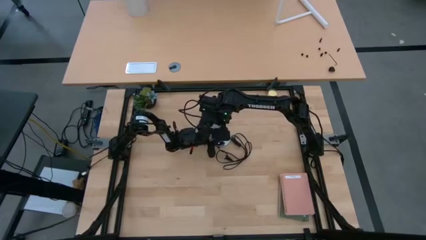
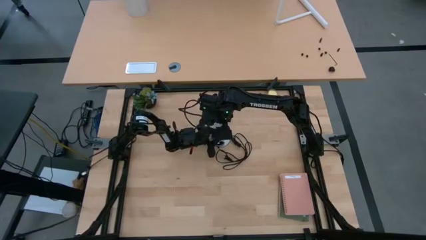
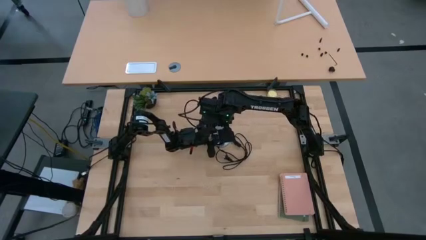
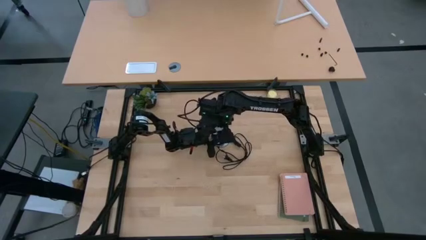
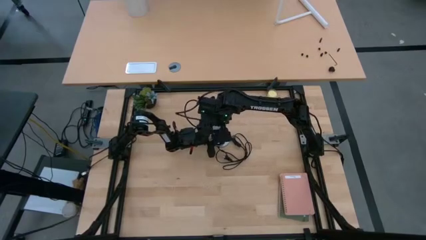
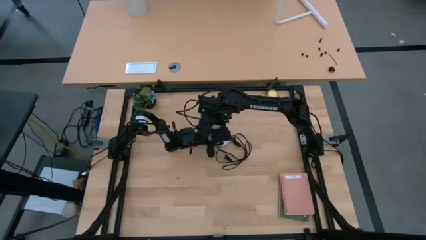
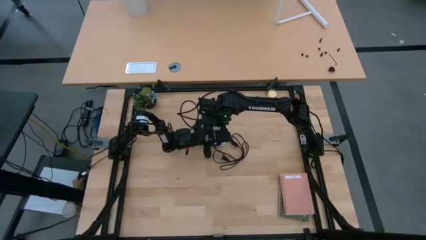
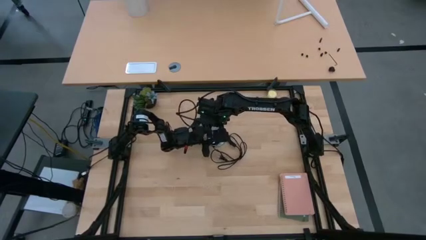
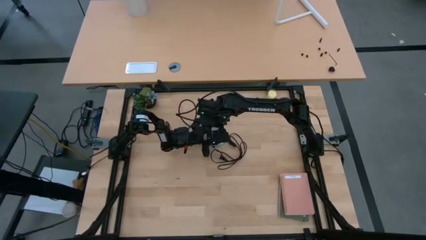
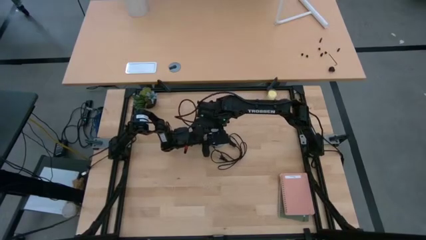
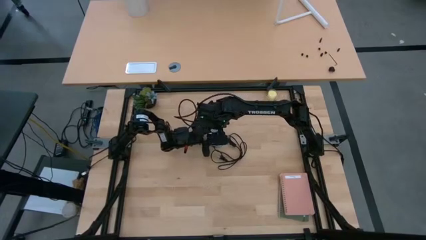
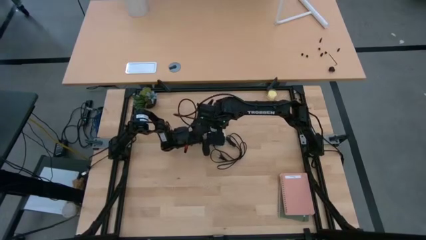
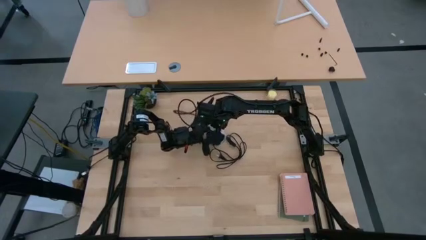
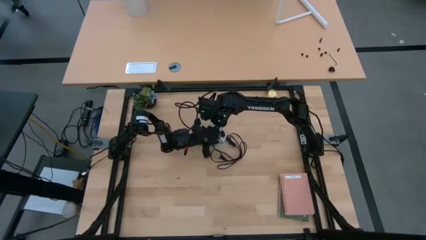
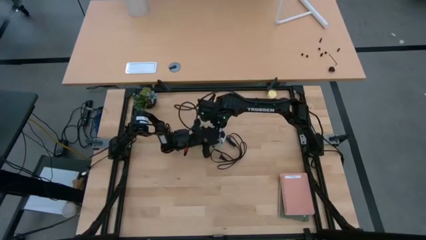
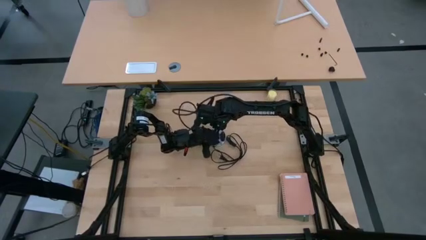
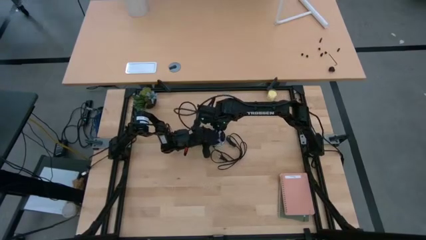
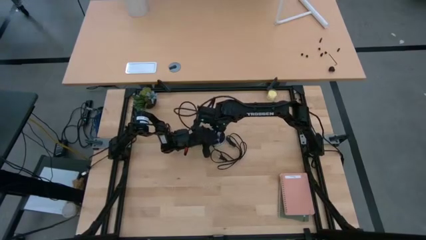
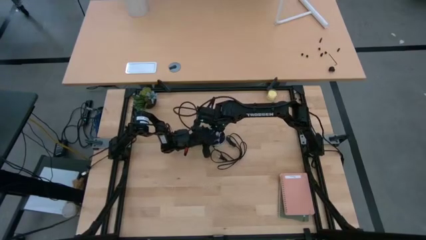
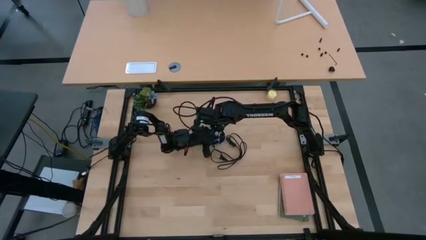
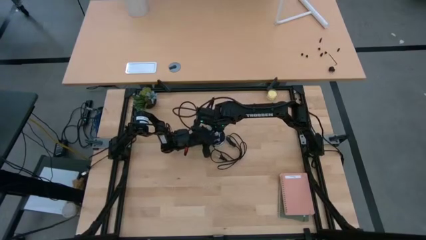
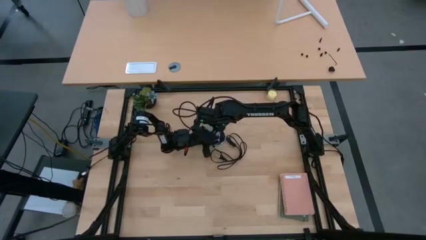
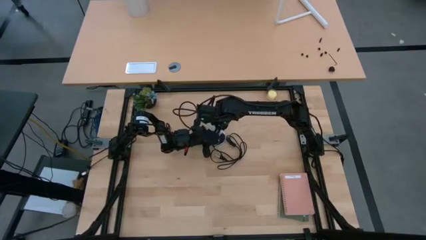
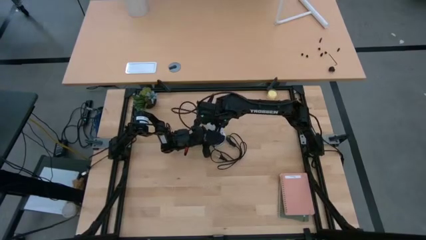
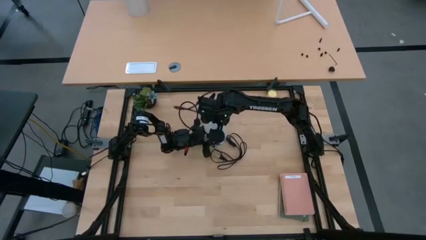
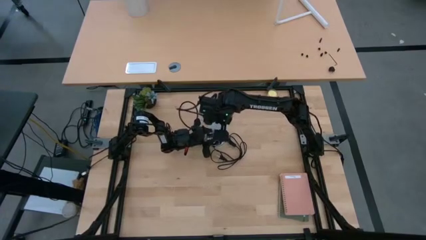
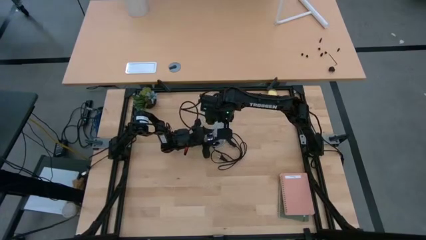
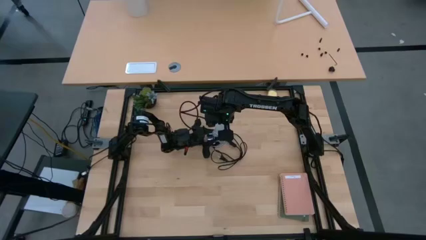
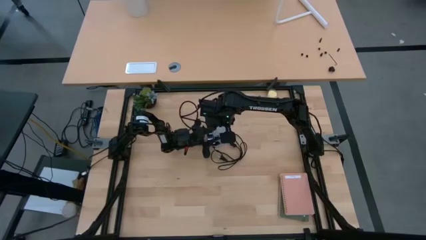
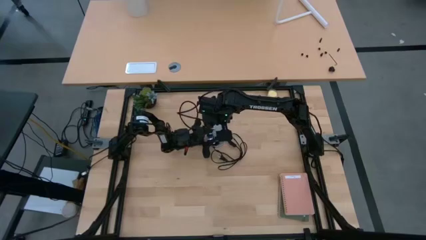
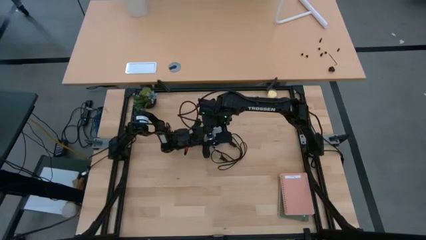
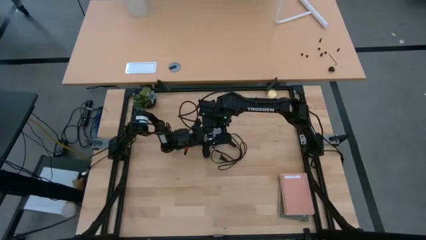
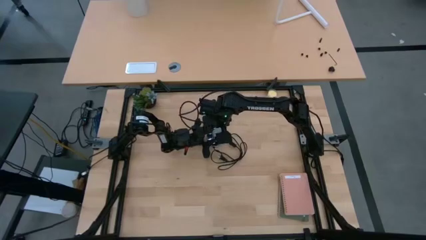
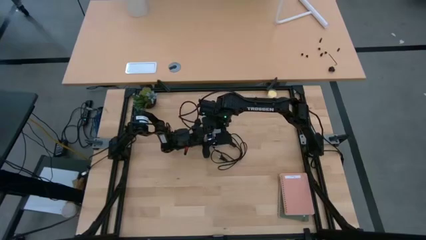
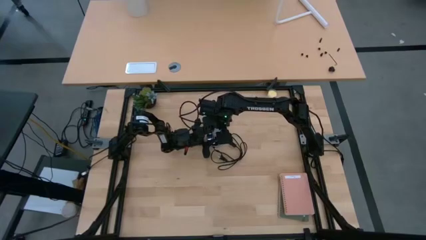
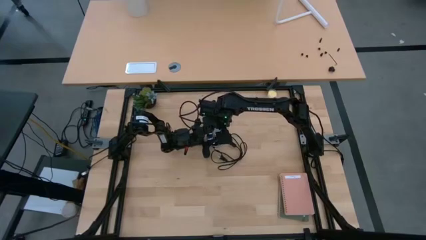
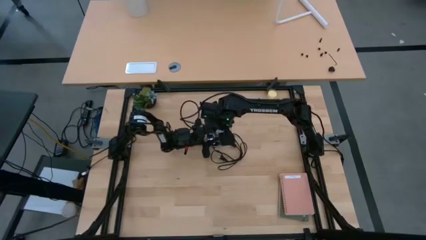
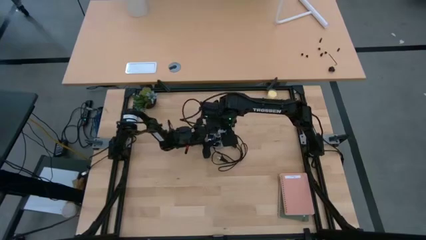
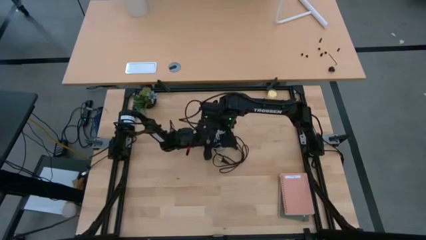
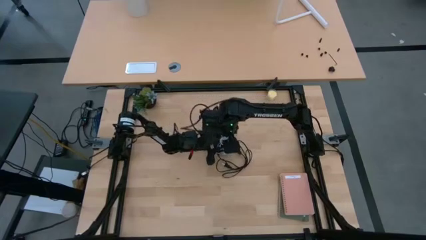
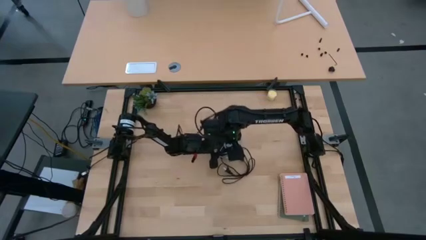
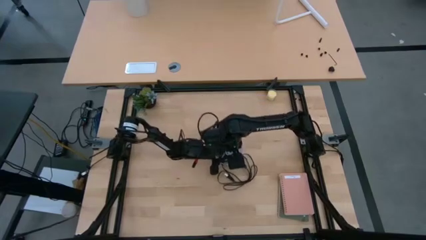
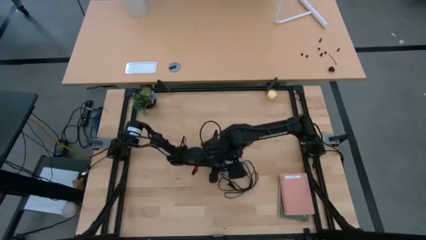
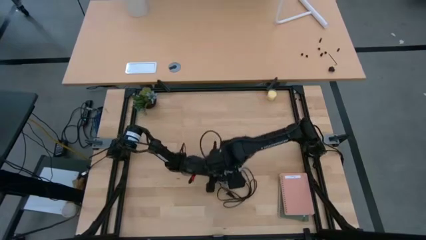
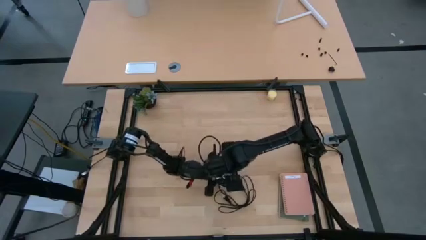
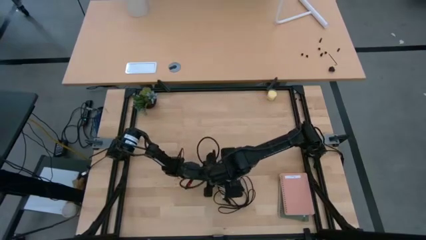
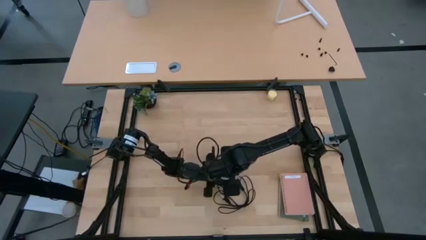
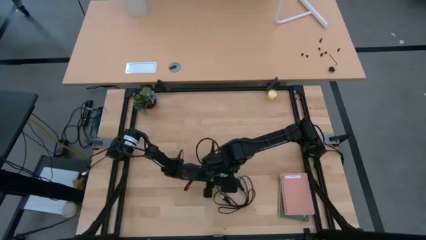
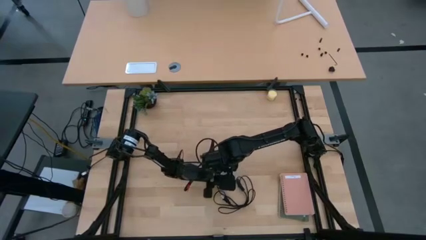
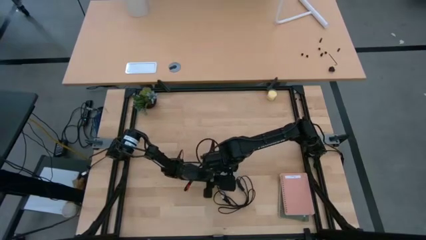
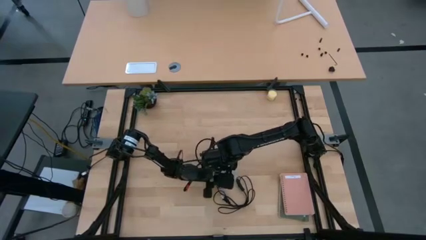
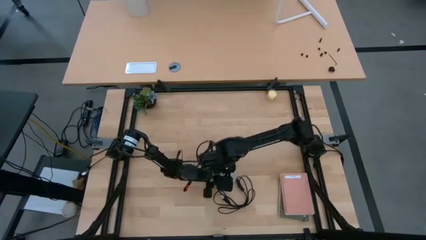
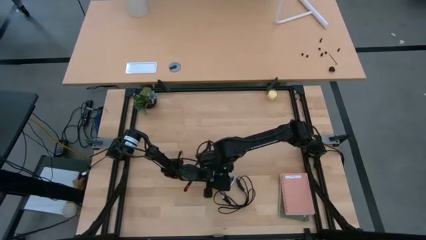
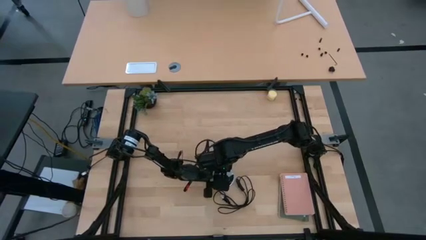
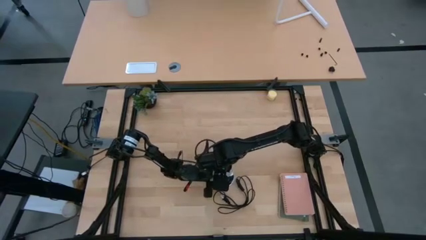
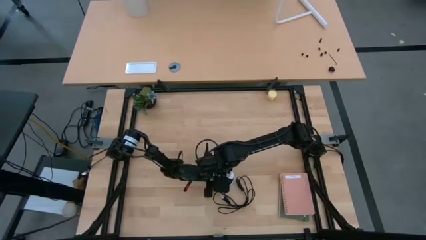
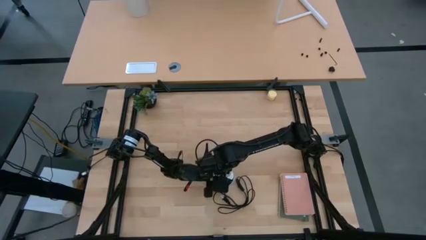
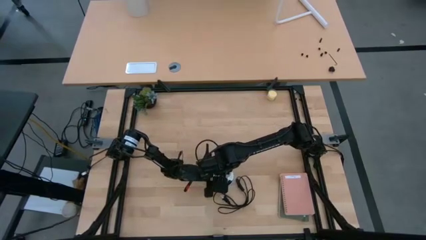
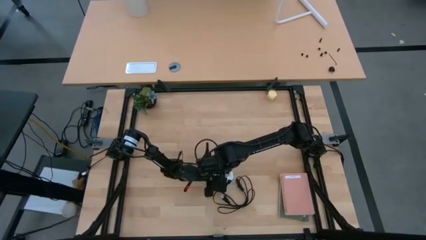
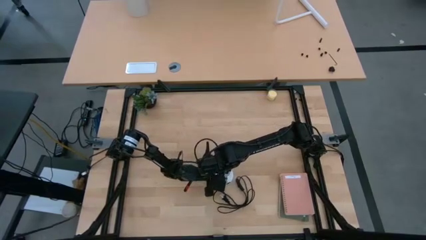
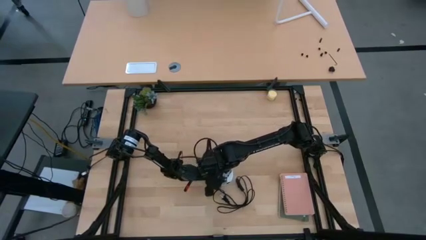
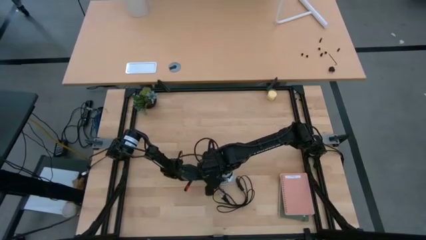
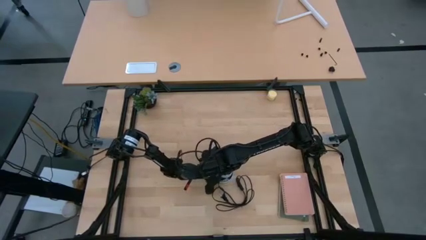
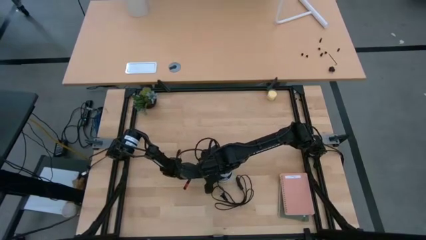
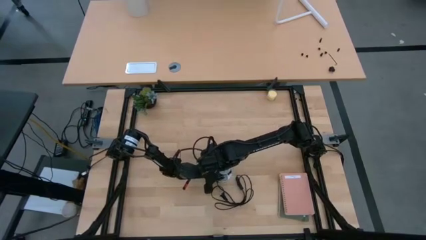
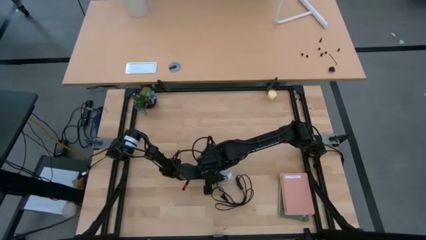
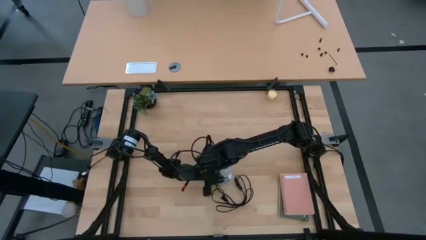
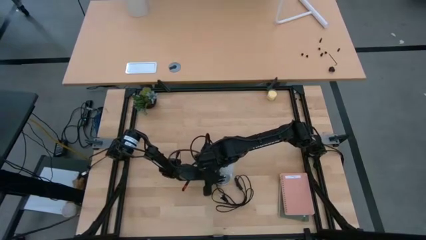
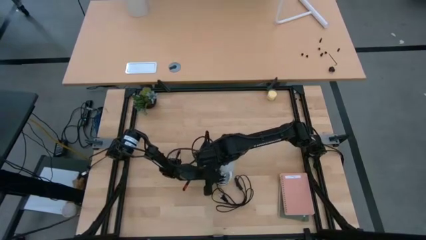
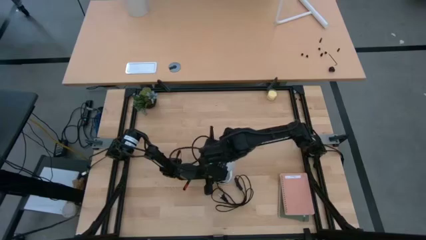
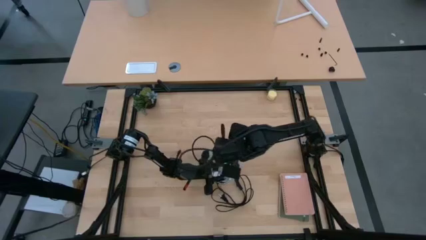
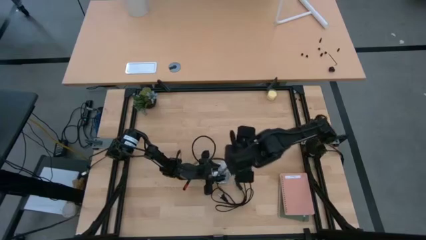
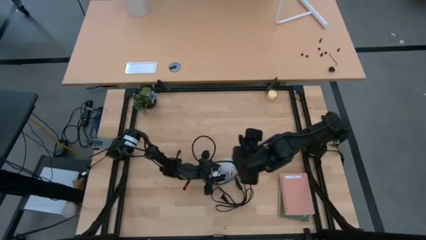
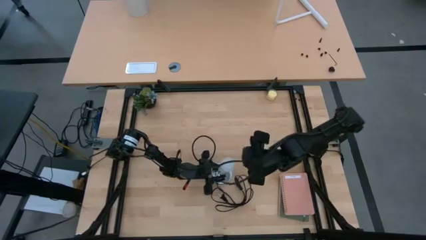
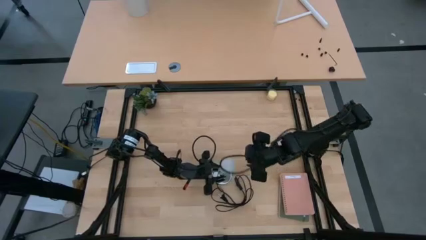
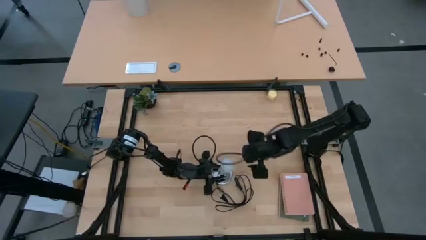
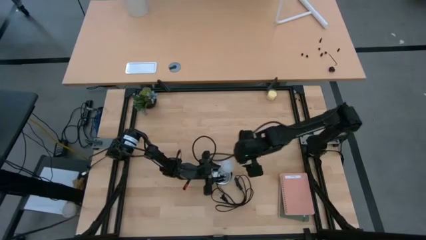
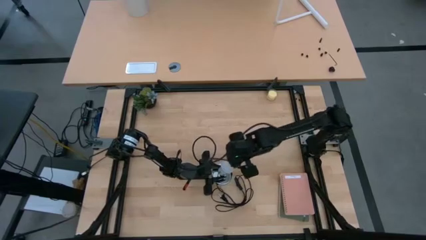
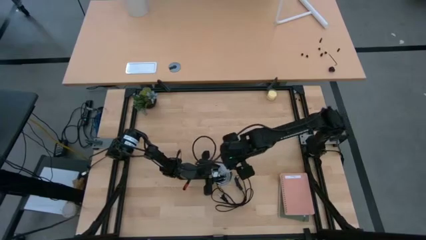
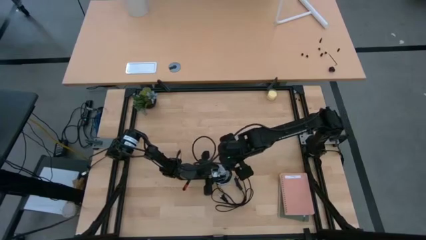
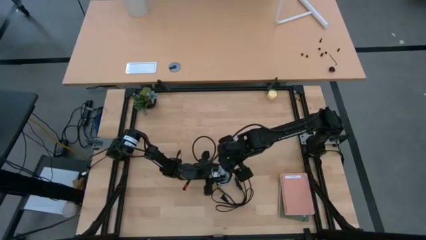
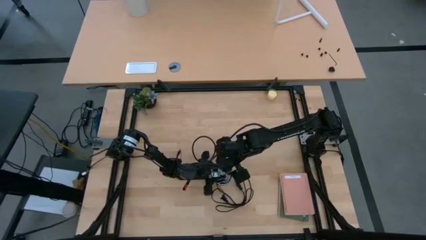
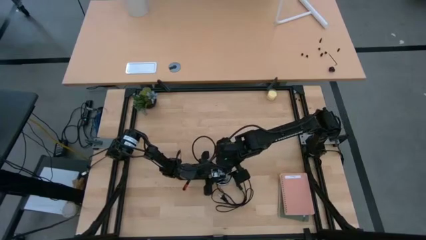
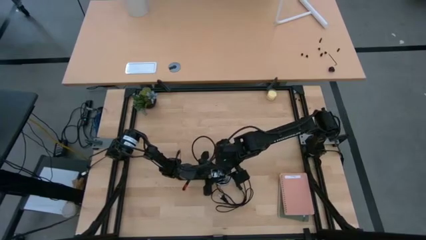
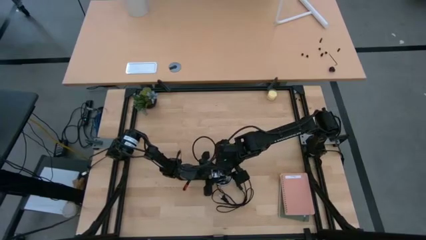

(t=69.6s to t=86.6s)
Task: Screw lightbulb
Insert the lightbulb into the lamp
